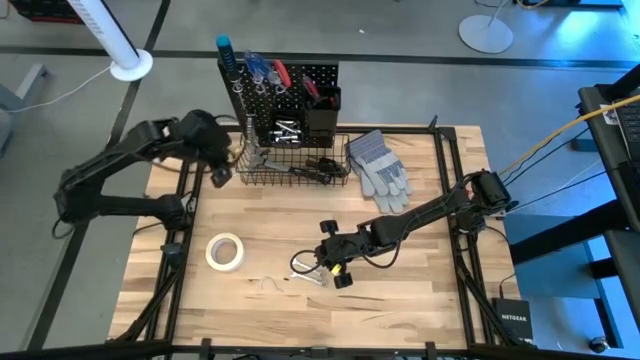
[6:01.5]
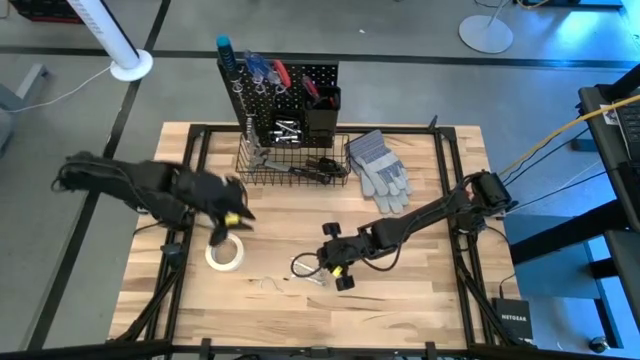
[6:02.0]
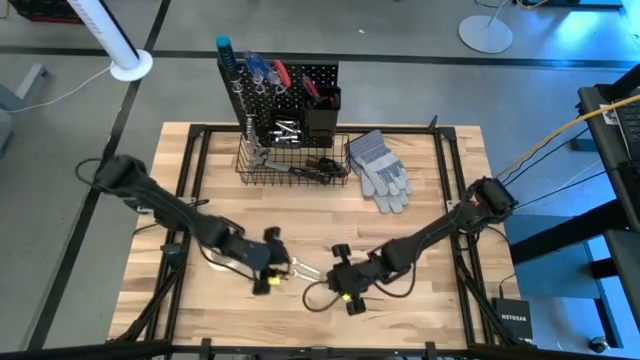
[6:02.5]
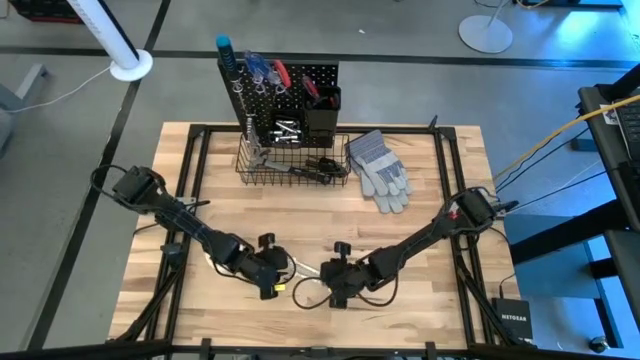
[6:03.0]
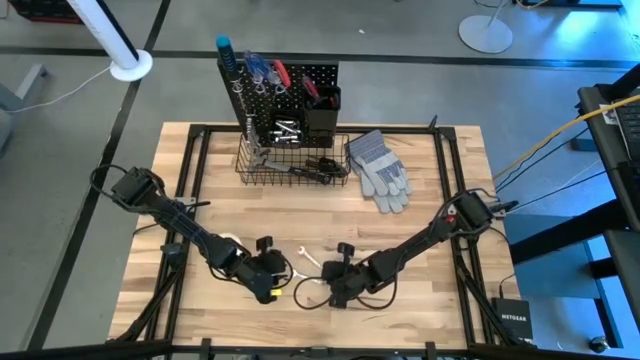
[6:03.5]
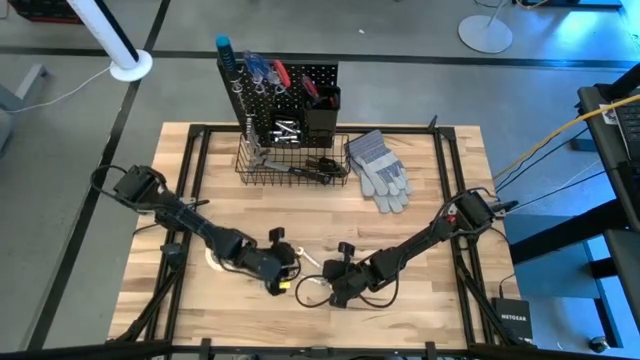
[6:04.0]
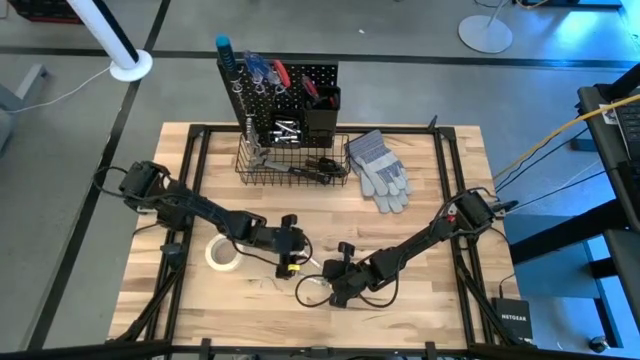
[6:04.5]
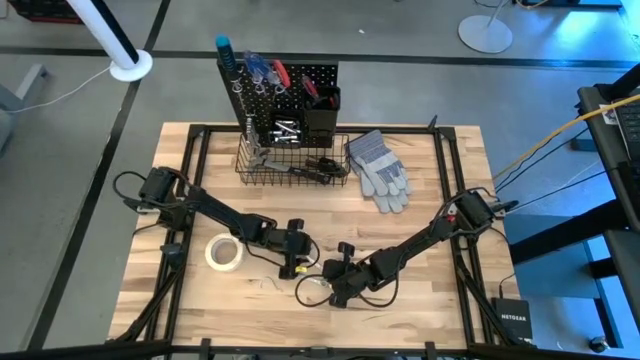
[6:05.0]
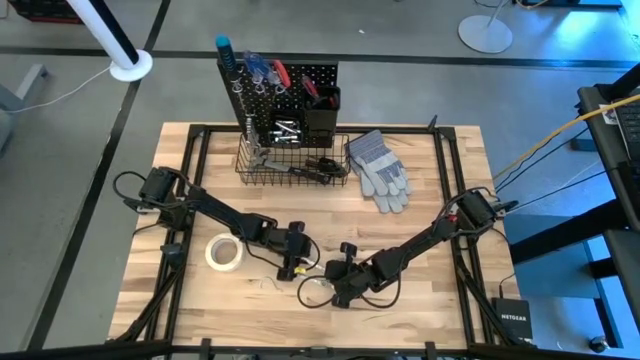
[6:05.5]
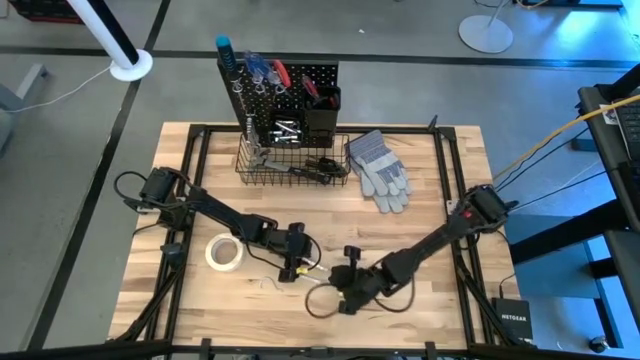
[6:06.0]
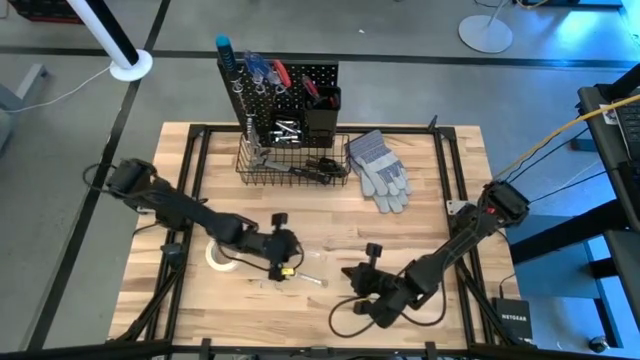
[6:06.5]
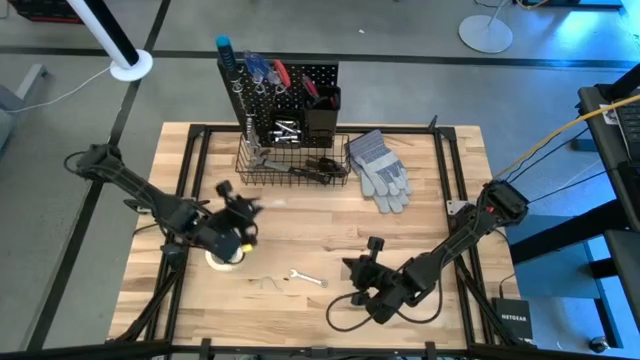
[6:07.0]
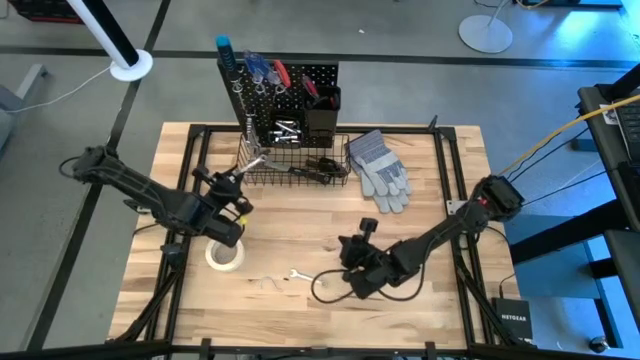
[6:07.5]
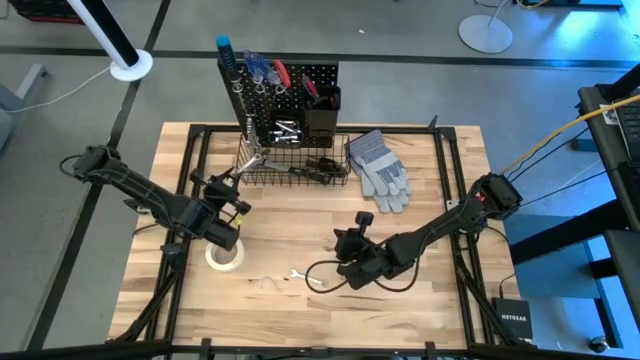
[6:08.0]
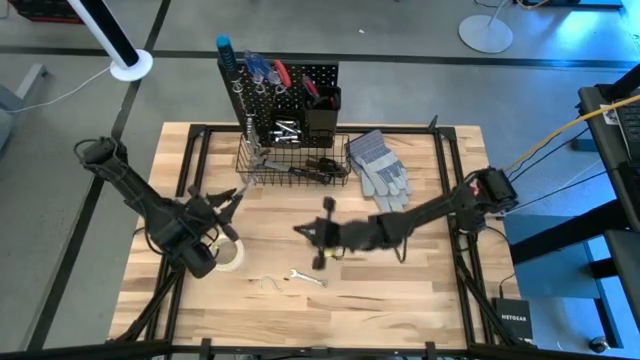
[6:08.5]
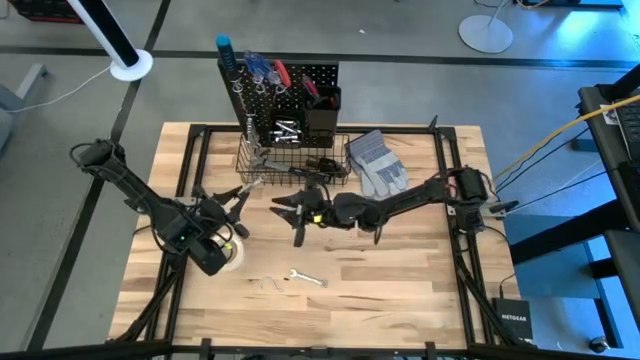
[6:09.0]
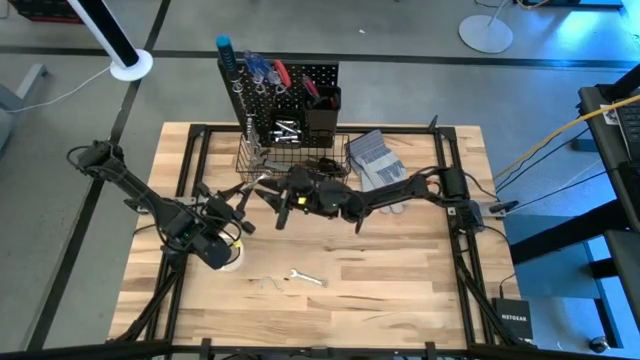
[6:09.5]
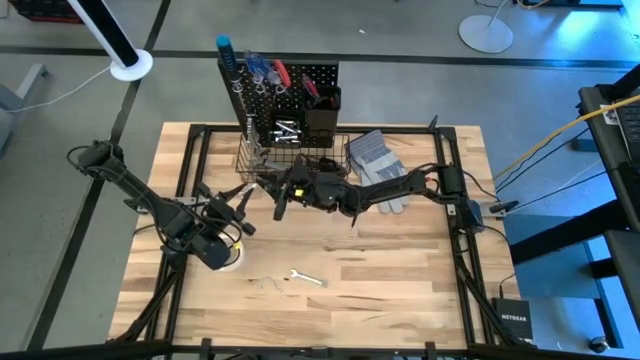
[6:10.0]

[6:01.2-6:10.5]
Task: Hang tools onto peg board
Hang the wrench on the peg board

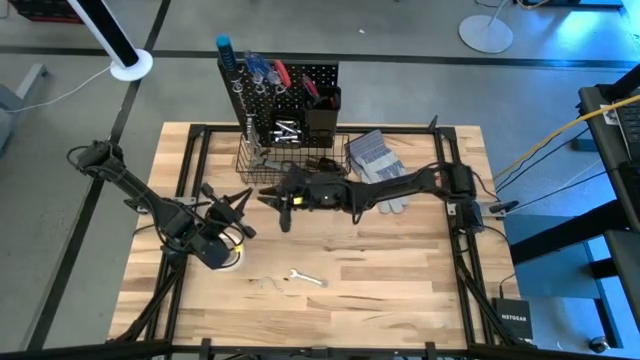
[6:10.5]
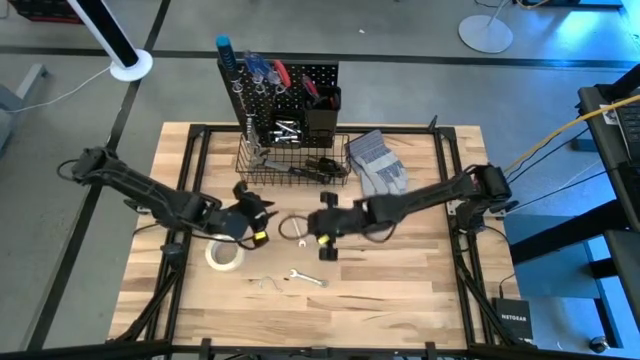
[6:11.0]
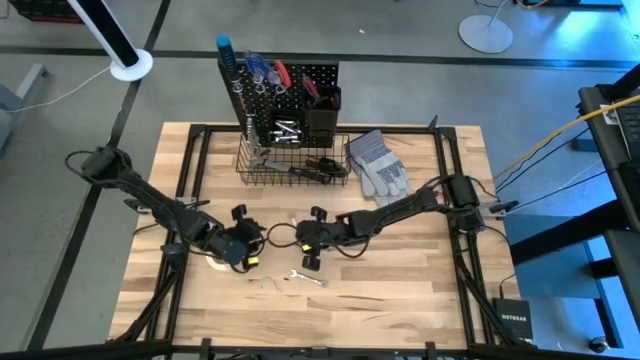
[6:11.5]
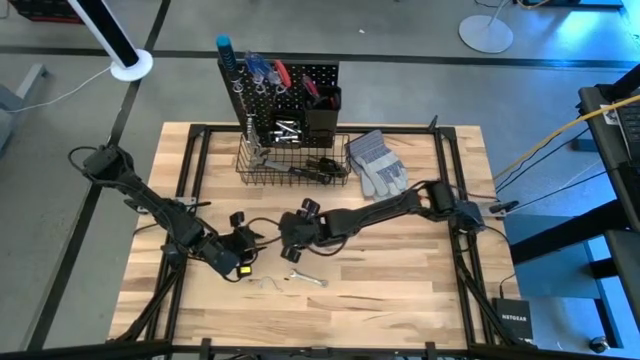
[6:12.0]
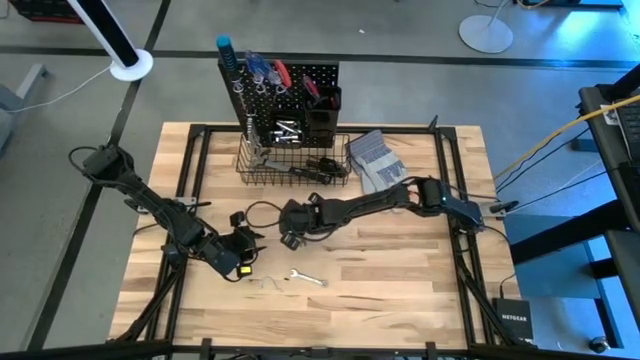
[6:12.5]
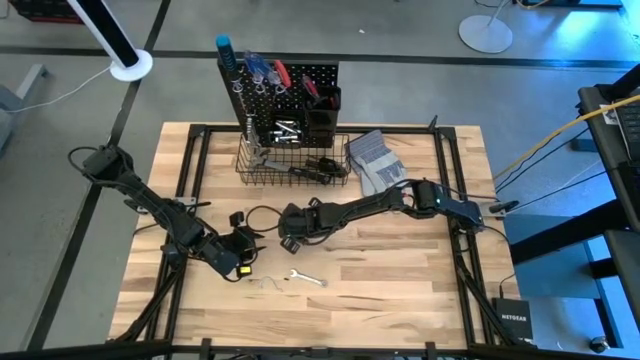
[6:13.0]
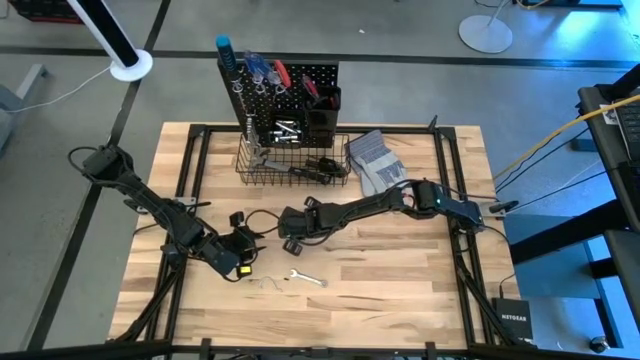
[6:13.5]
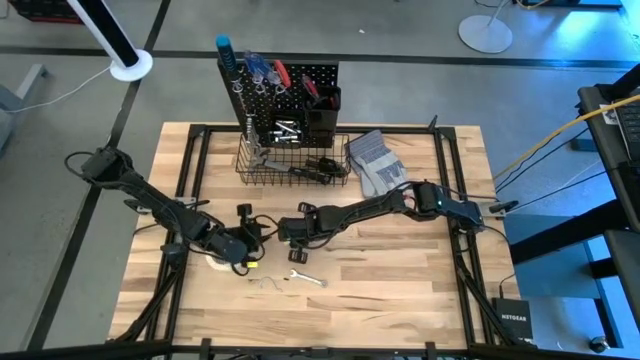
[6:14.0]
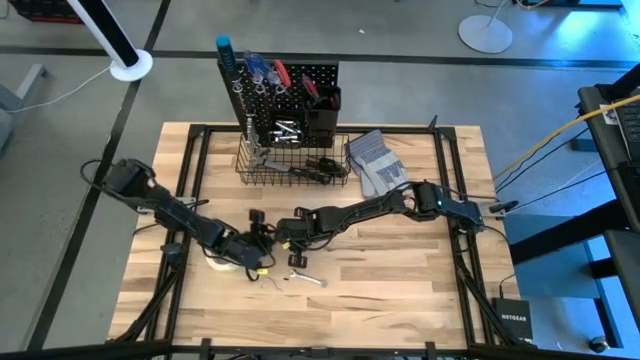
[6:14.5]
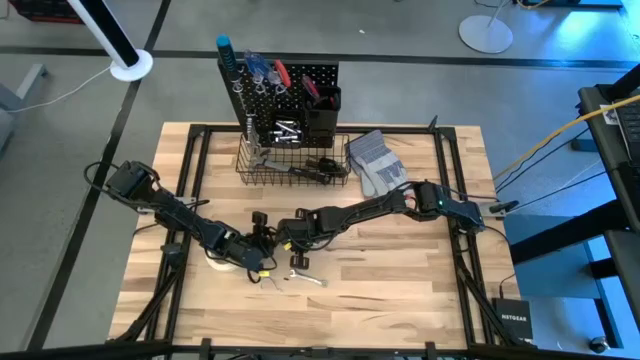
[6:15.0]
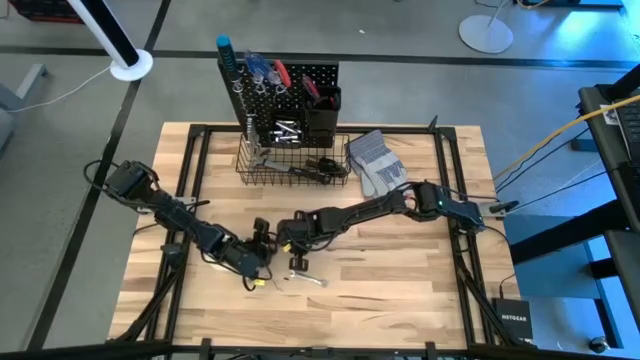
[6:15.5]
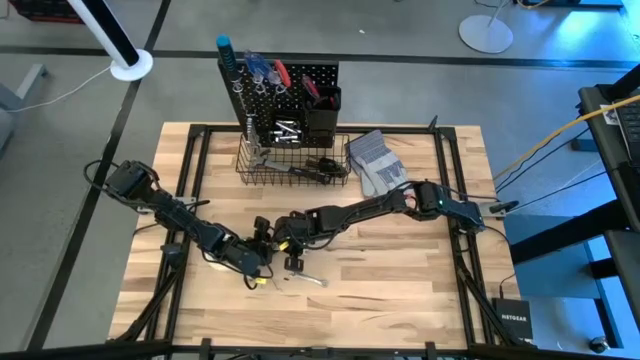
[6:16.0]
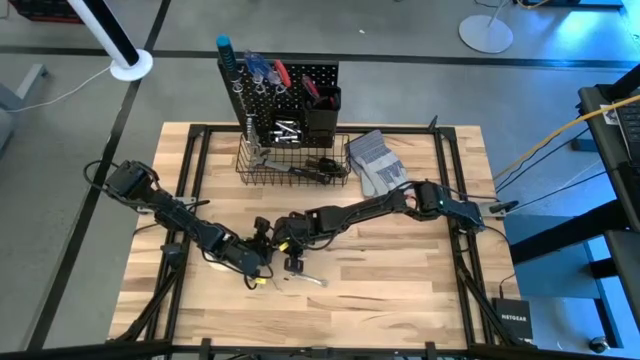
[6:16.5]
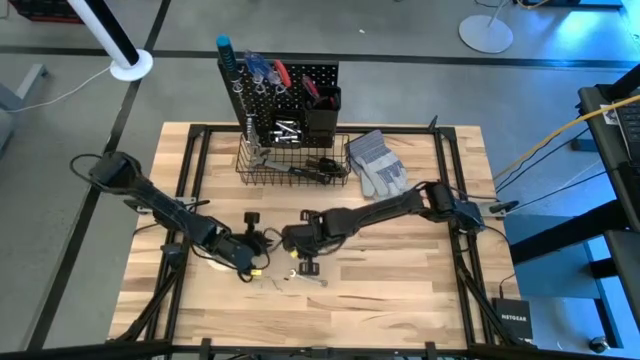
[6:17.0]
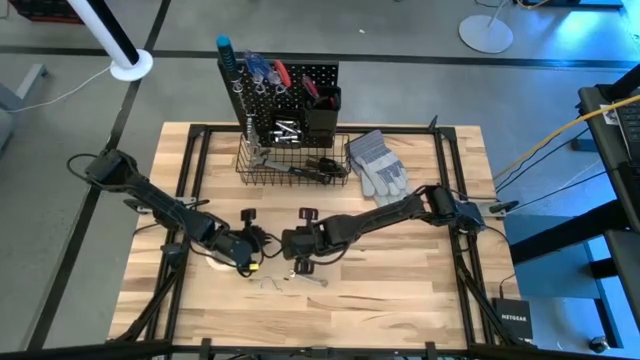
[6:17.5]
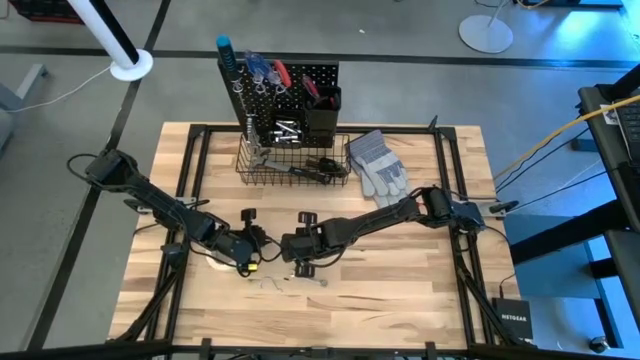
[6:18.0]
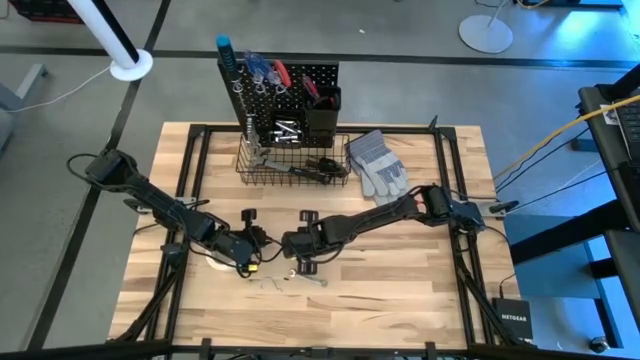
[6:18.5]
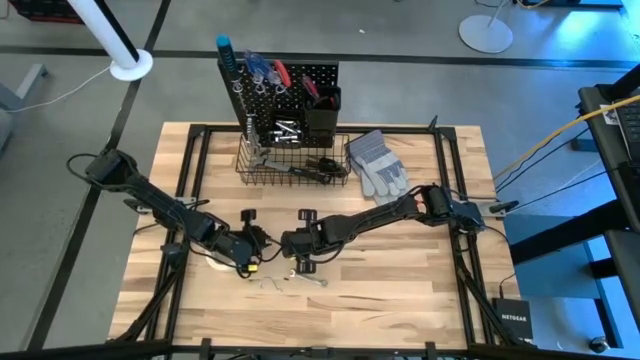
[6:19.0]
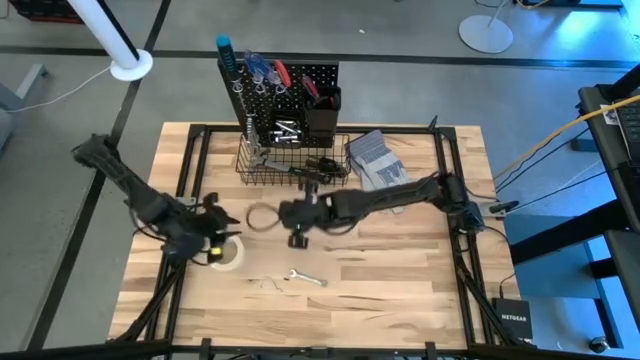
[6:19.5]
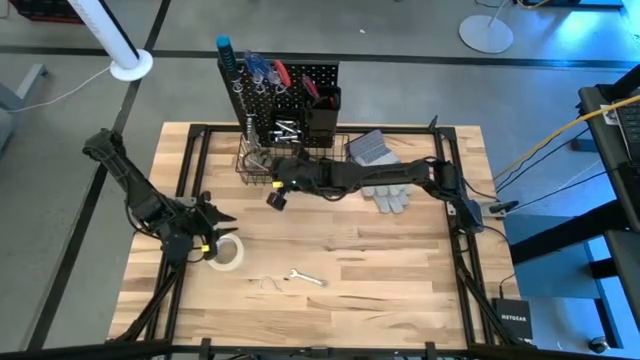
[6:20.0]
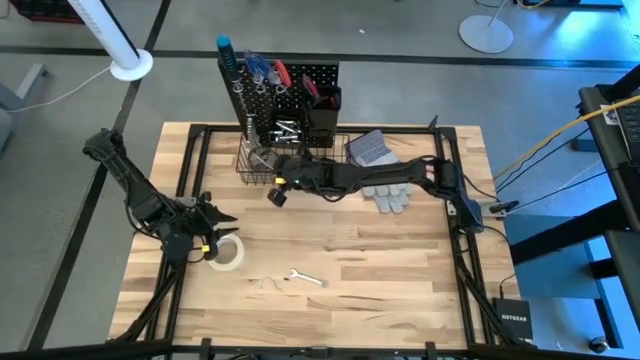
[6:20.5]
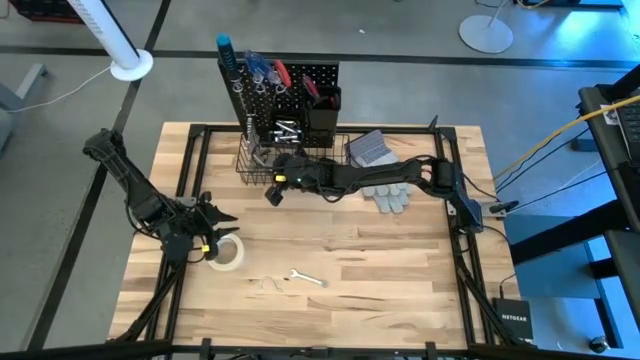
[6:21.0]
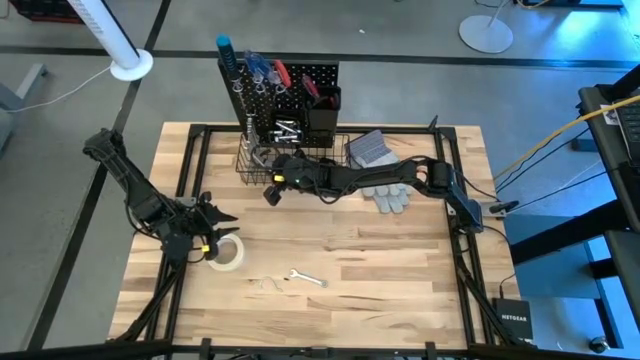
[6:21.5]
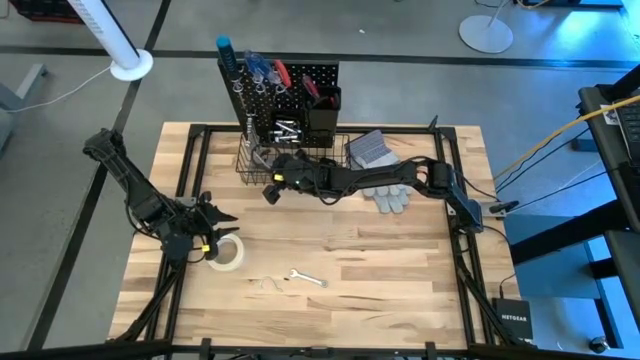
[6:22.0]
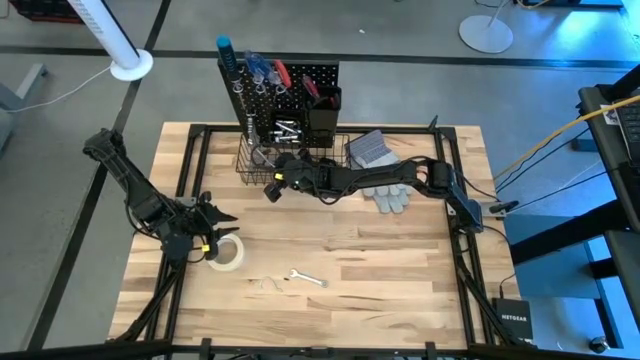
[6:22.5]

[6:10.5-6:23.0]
Hang the wrench on the peg board
